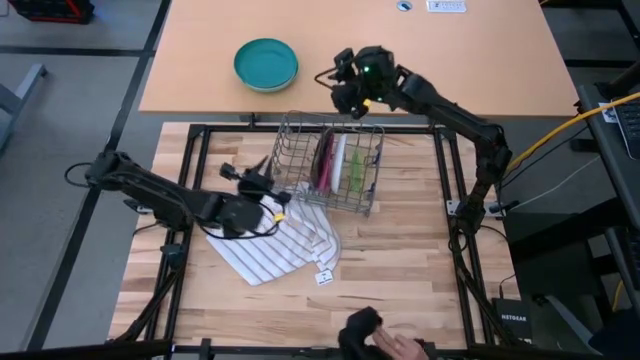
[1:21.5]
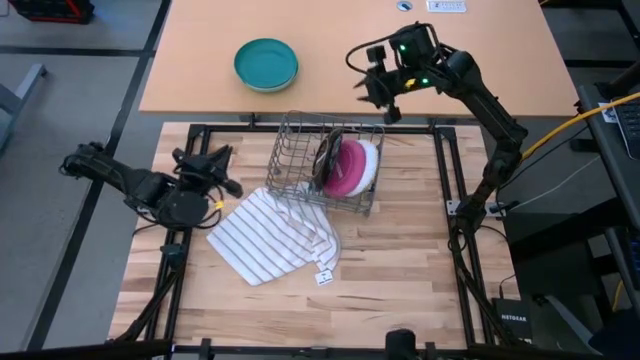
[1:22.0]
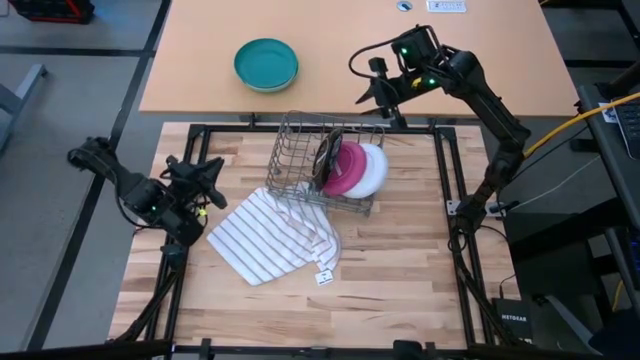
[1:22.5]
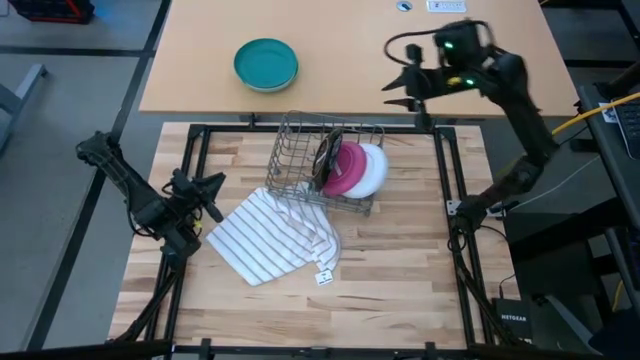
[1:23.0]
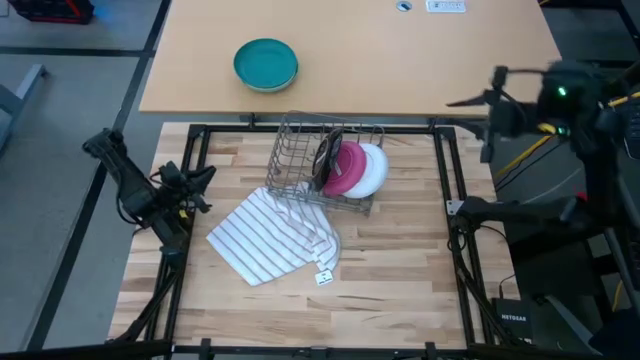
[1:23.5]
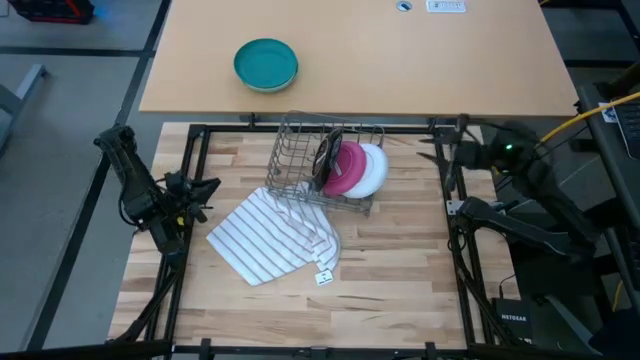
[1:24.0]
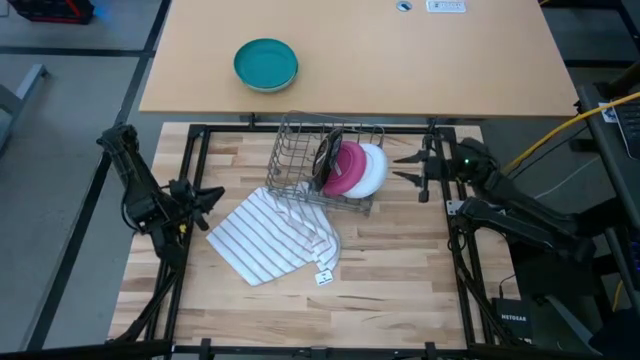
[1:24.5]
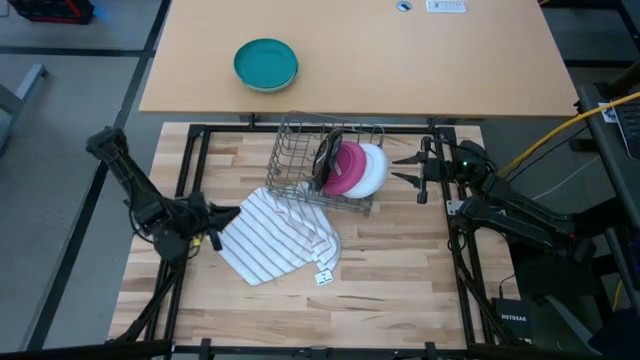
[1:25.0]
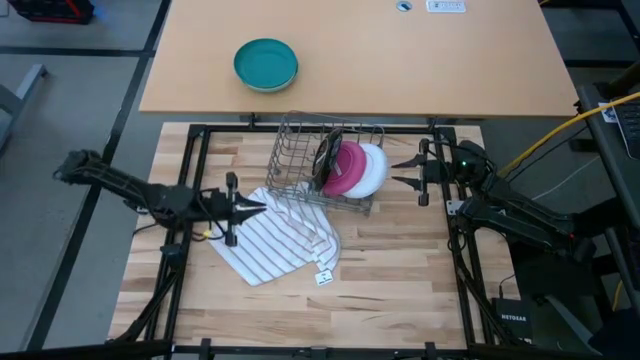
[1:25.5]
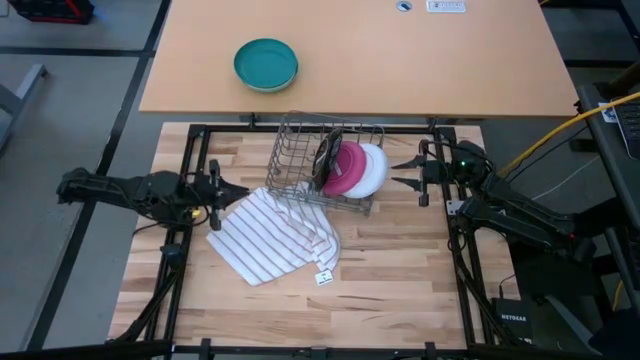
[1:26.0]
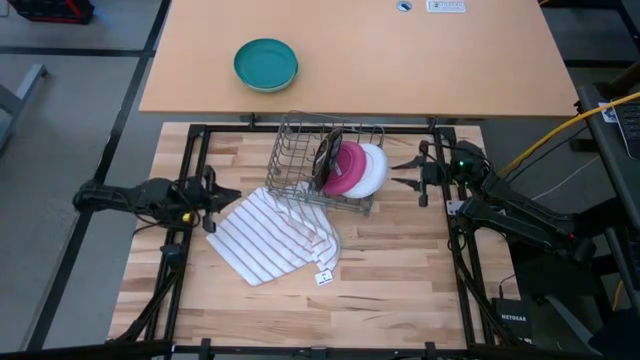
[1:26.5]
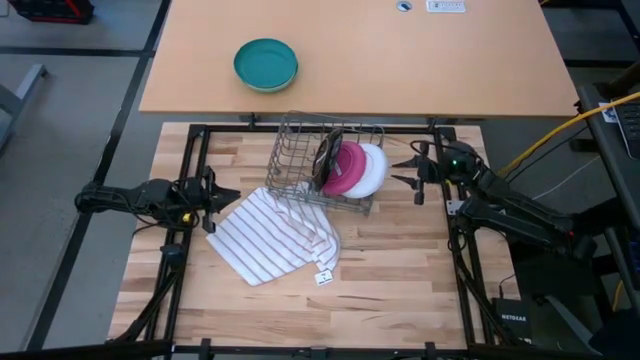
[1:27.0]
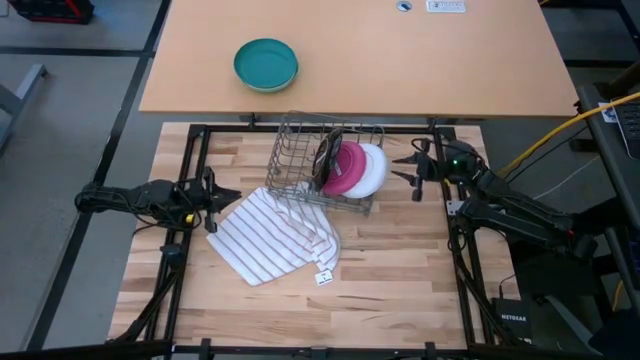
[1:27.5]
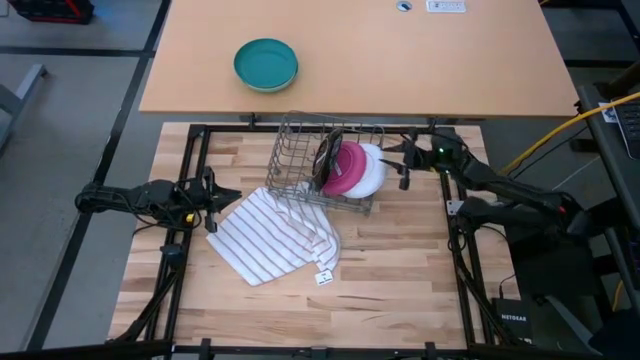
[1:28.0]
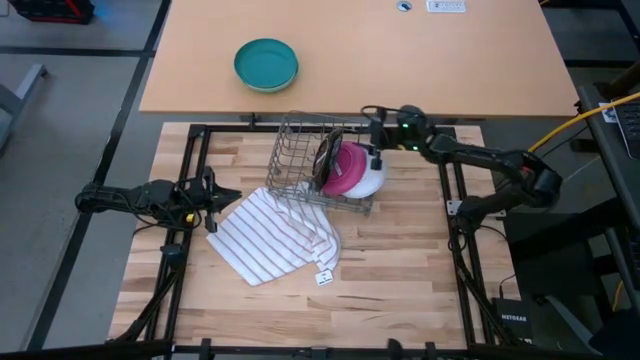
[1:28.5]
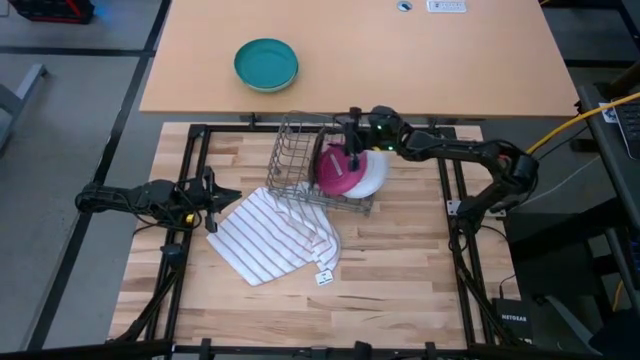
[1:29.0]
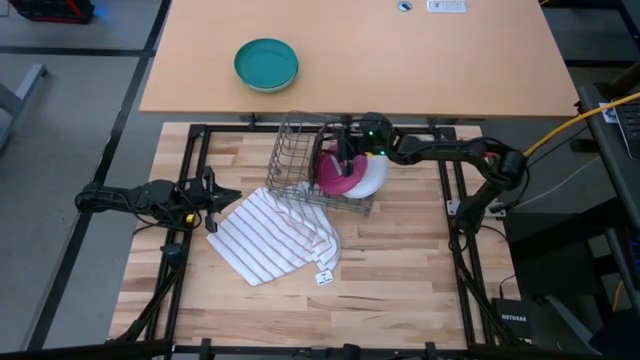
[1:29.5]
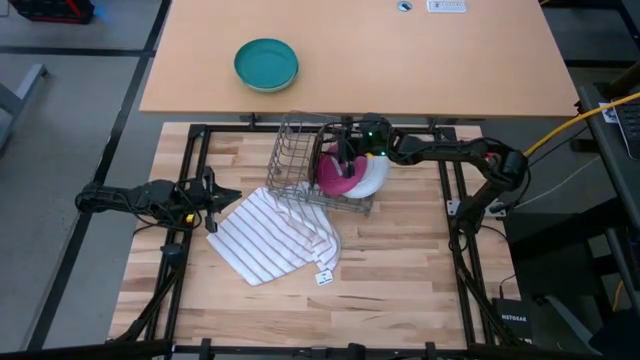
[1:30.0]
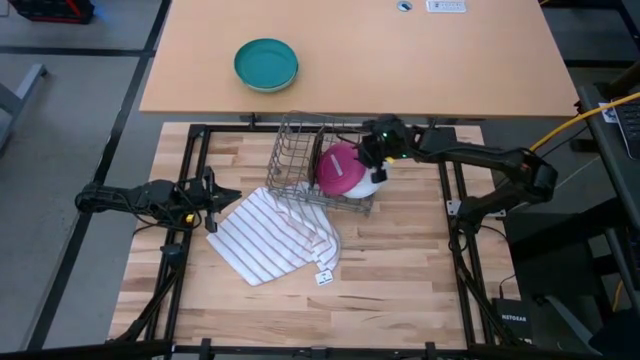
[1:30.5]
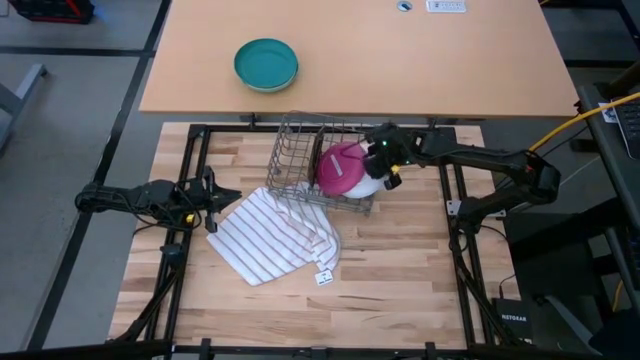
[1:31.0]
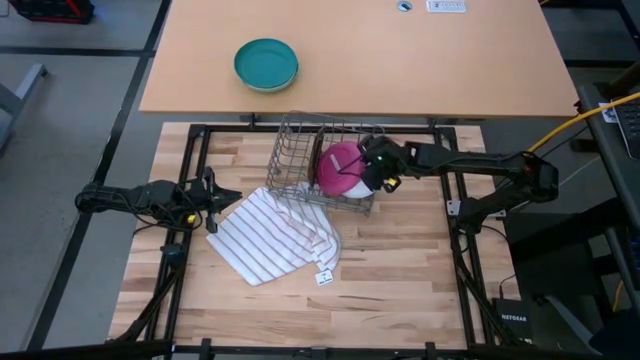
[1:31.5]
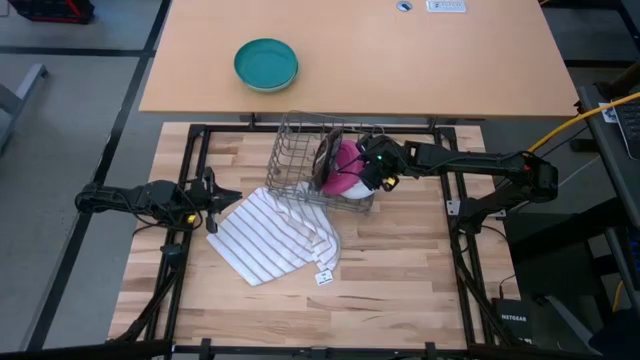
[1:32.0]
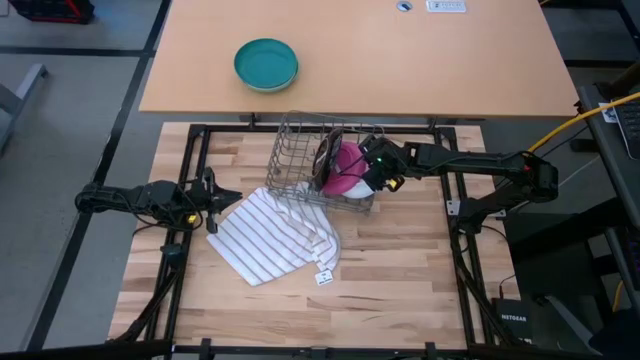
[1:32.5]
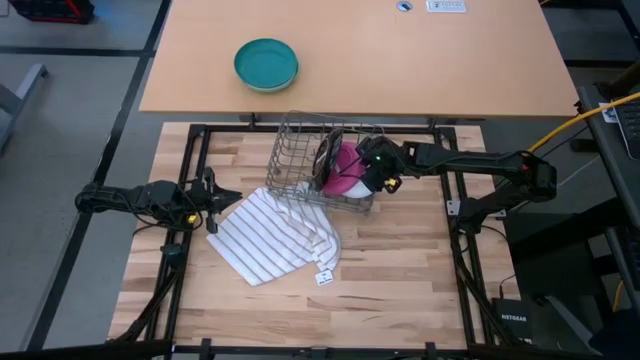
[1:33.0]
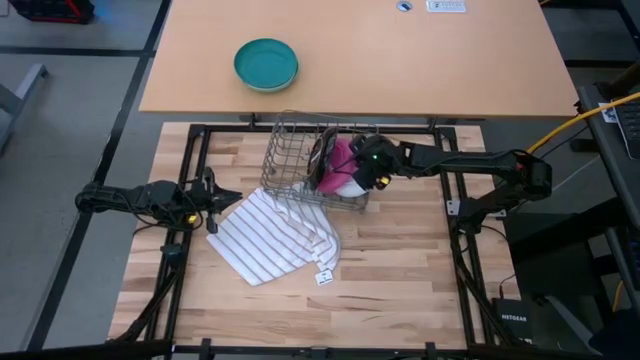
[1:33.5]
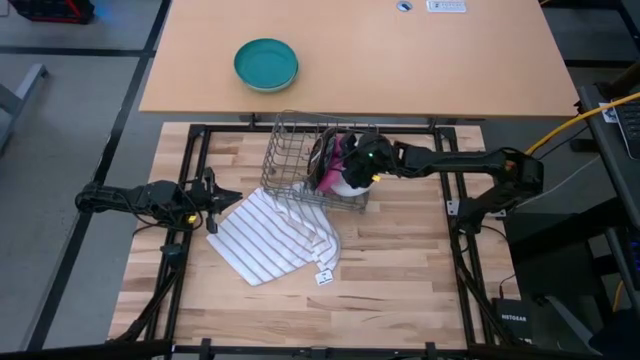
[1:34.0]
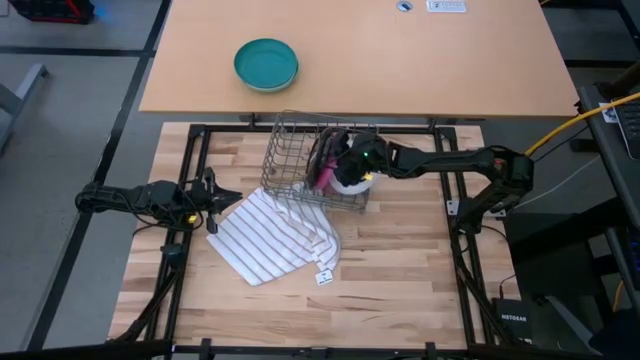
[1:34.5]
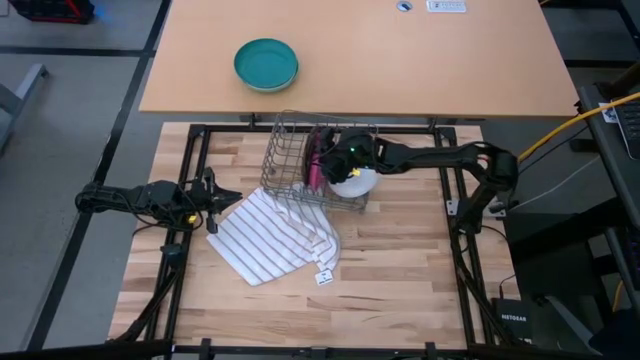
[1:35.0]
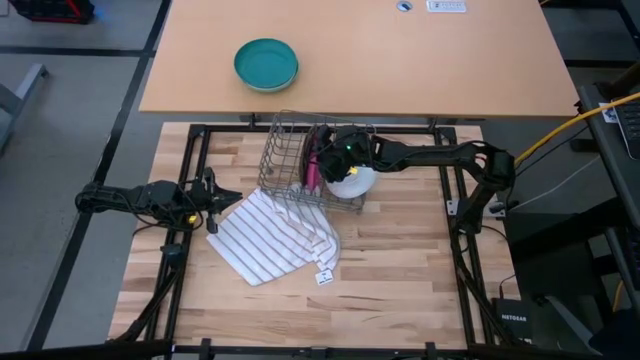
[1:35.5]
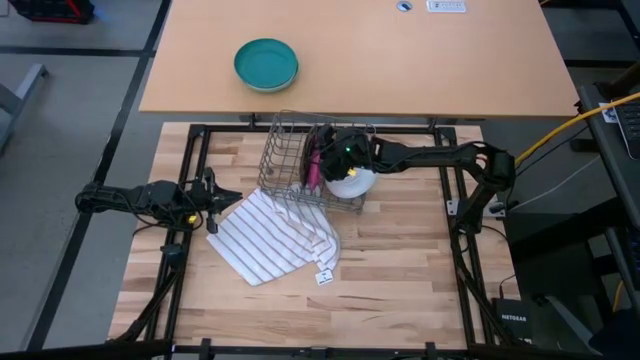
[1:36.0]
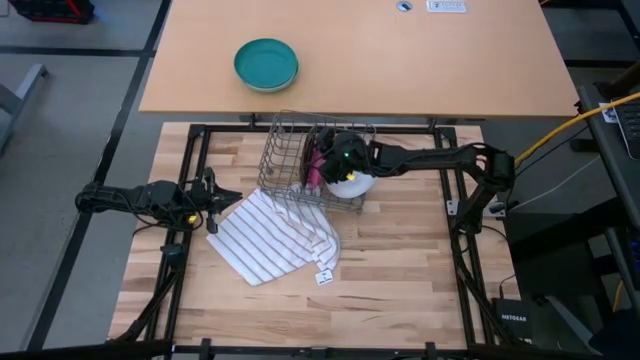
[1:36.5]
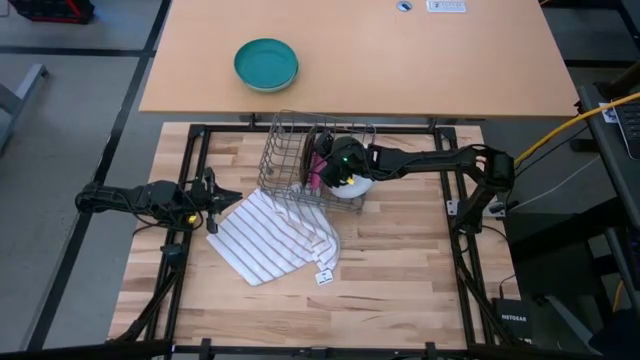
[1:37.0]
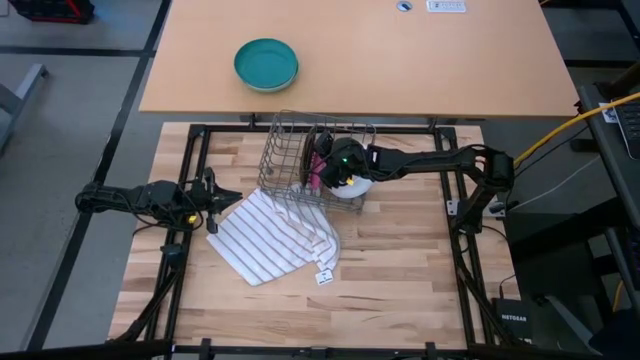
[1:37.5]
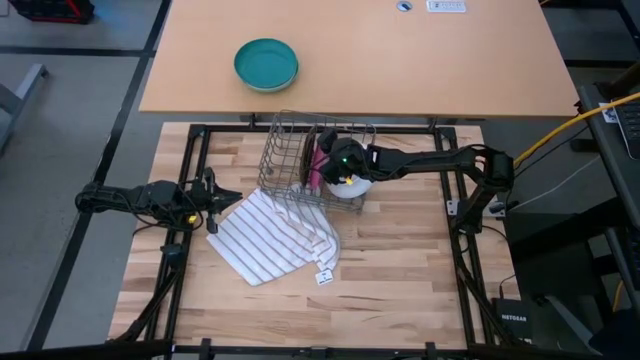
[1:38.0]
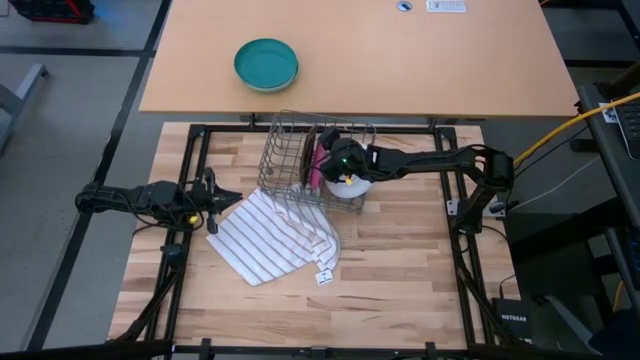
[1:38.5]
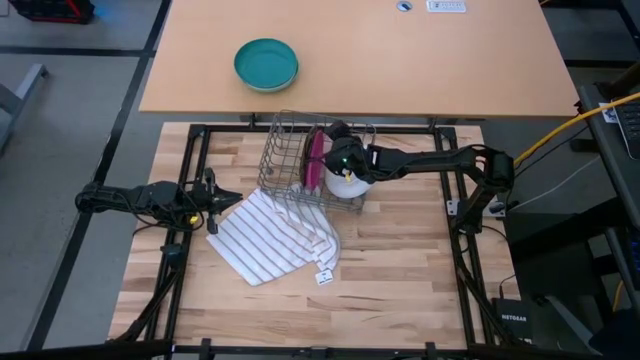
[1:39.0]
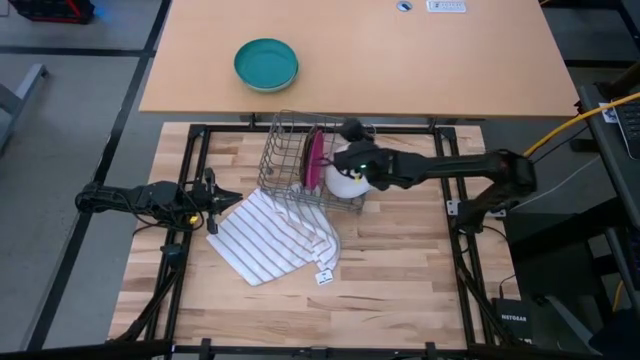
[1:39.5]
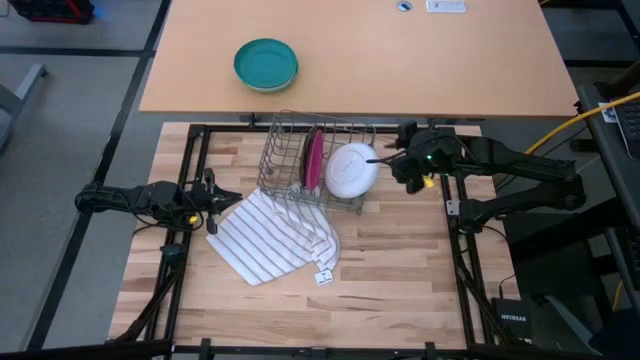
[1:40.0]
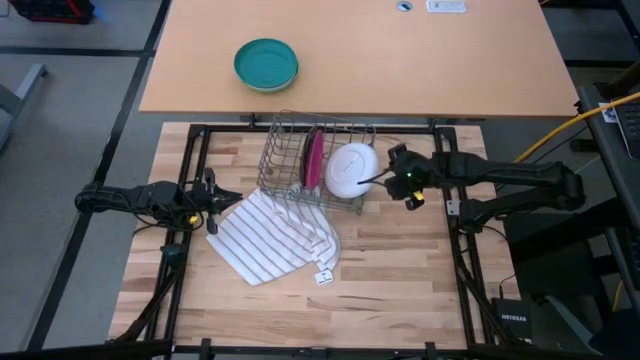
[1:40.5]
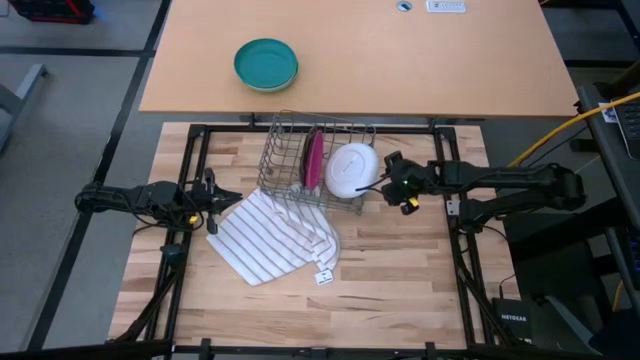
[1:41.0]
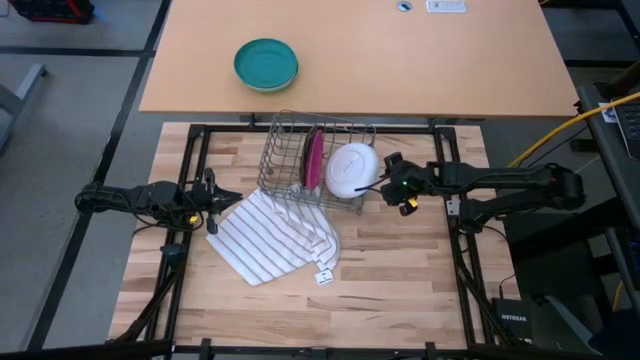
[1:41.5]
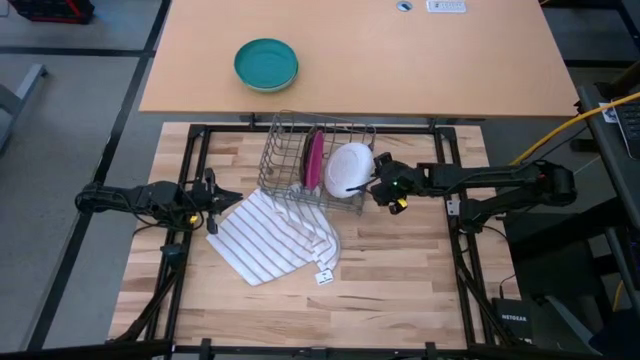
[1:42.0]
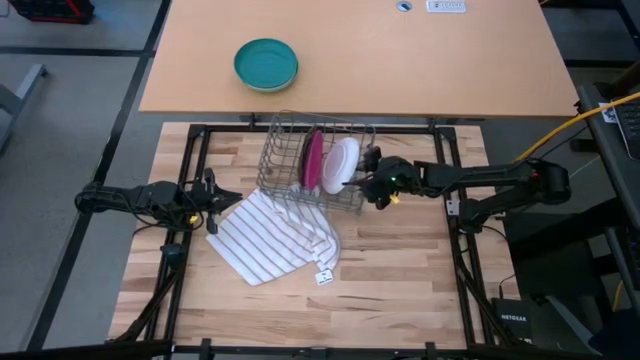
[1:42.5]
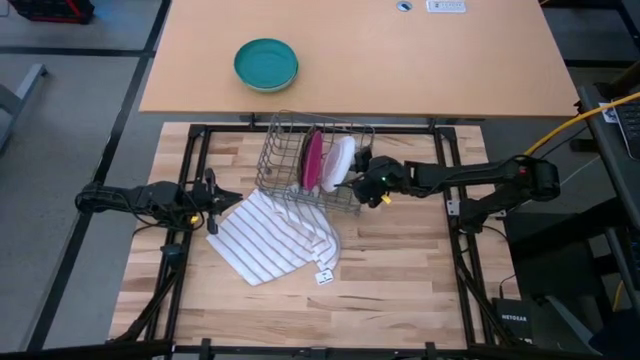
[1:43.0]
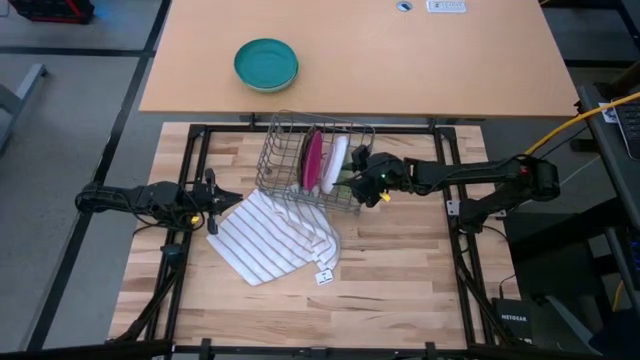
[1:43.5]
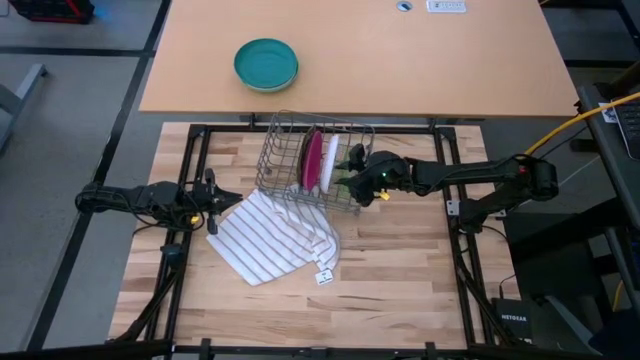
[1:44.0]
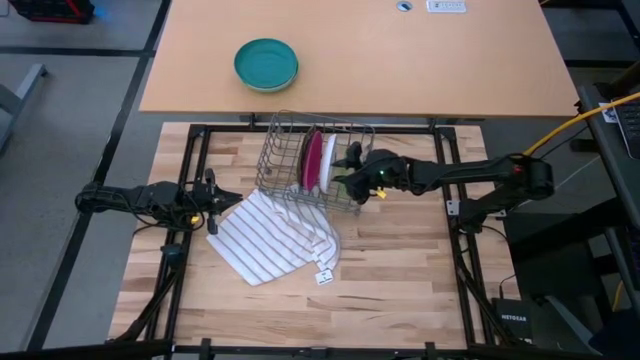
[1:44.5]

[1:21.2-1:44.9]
Task: Sort dishes
Adjust the plates in the dish rack
